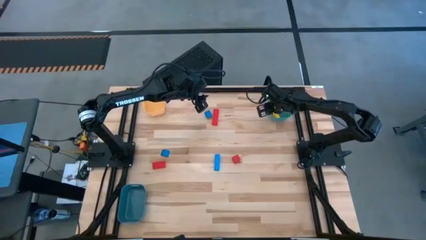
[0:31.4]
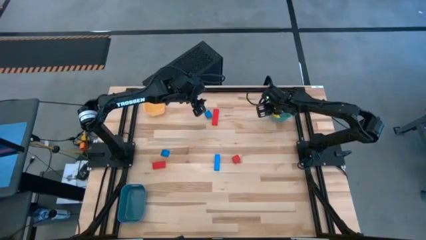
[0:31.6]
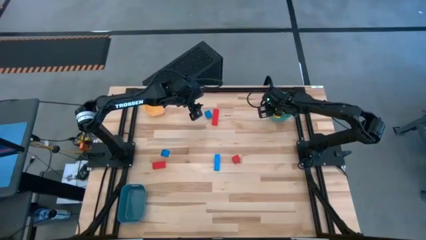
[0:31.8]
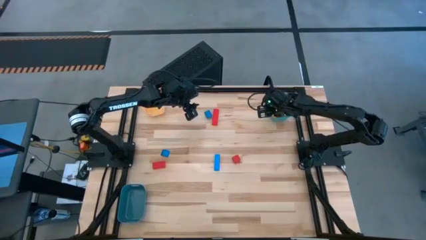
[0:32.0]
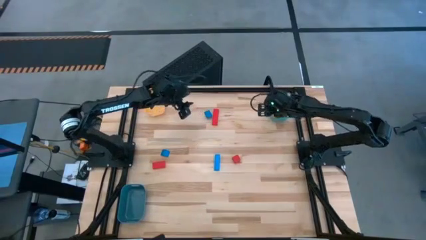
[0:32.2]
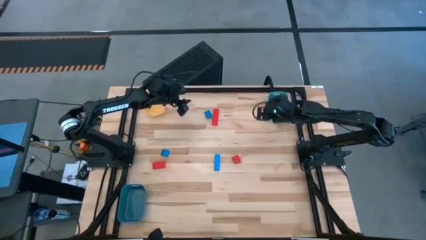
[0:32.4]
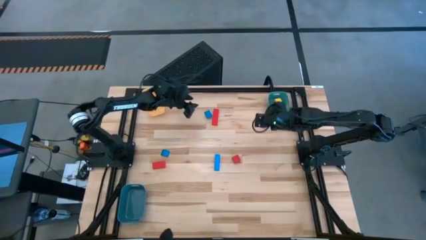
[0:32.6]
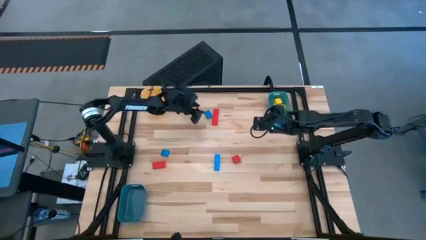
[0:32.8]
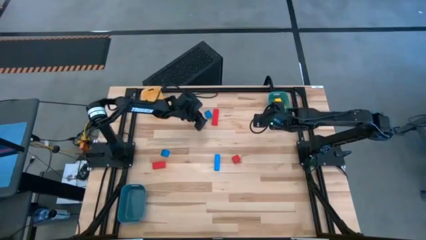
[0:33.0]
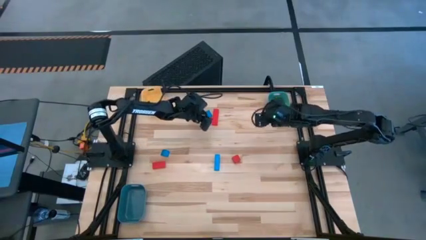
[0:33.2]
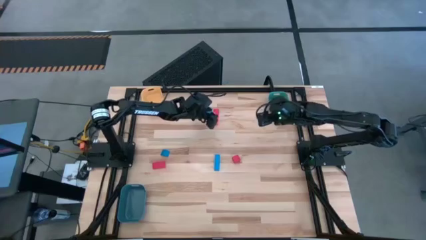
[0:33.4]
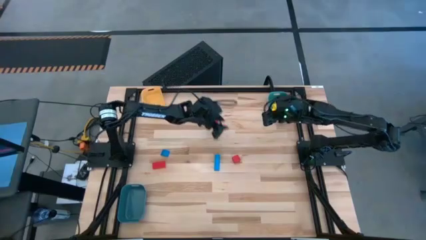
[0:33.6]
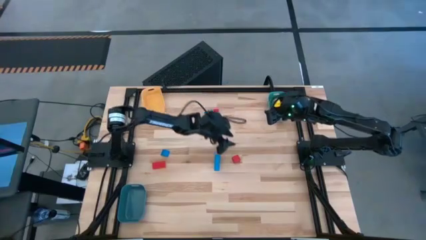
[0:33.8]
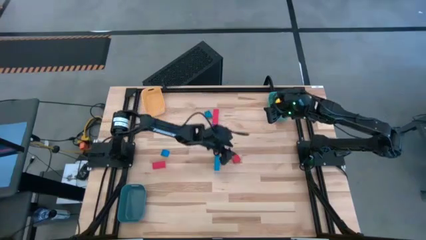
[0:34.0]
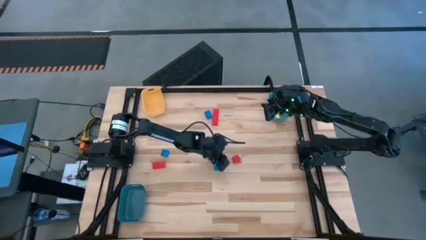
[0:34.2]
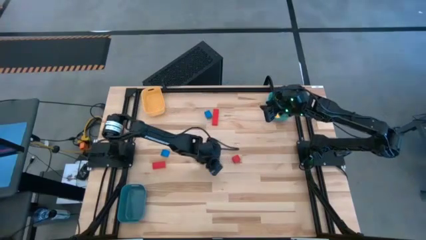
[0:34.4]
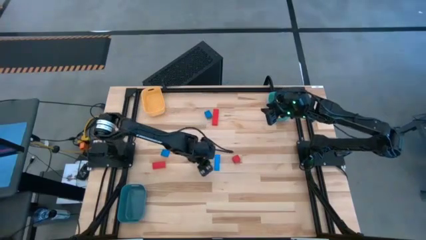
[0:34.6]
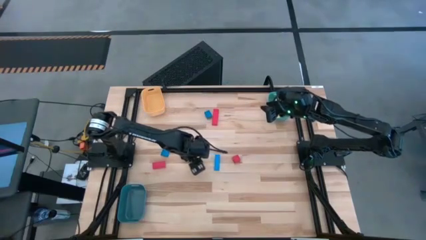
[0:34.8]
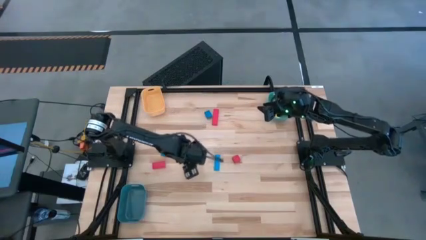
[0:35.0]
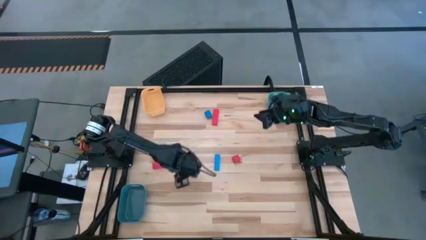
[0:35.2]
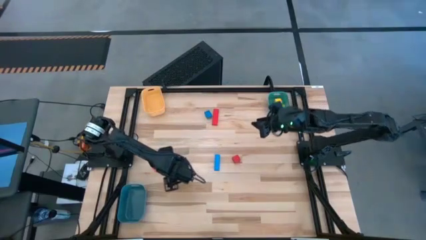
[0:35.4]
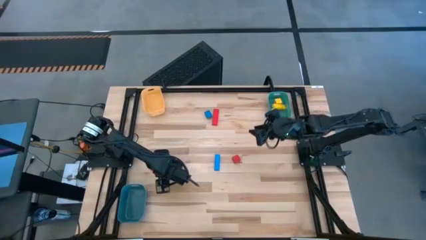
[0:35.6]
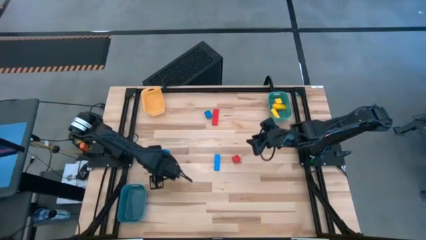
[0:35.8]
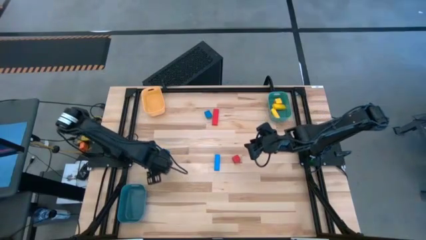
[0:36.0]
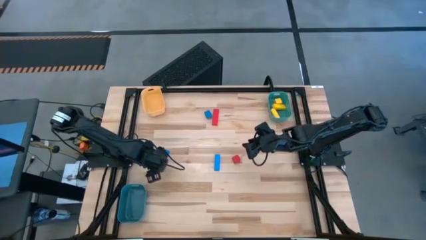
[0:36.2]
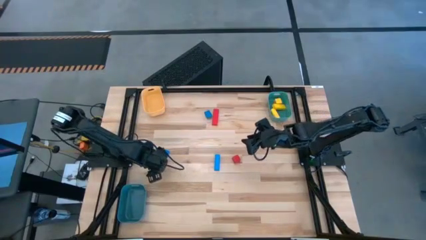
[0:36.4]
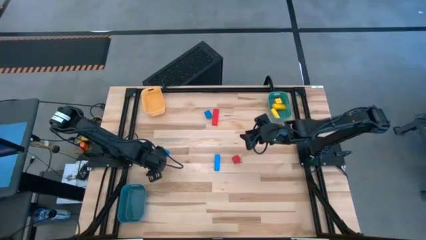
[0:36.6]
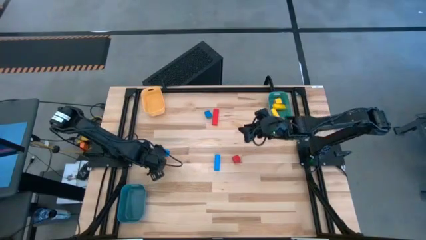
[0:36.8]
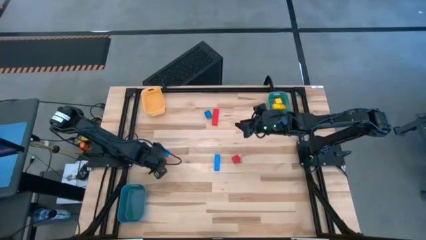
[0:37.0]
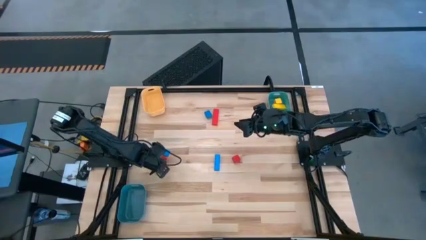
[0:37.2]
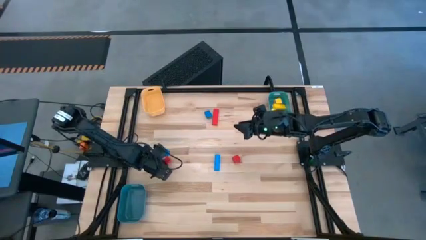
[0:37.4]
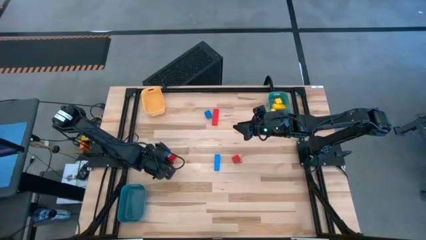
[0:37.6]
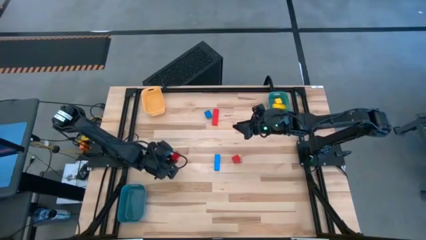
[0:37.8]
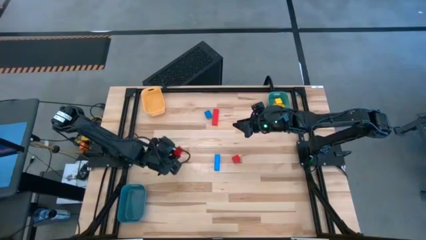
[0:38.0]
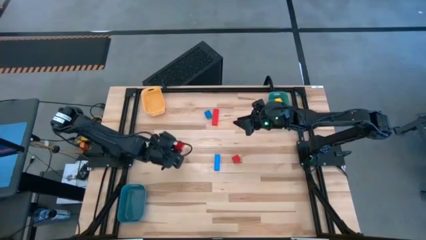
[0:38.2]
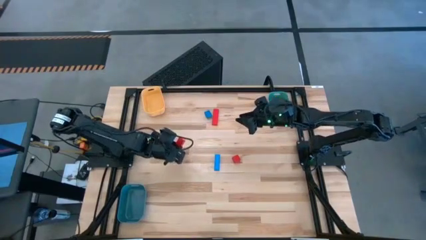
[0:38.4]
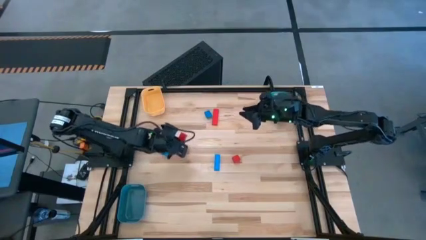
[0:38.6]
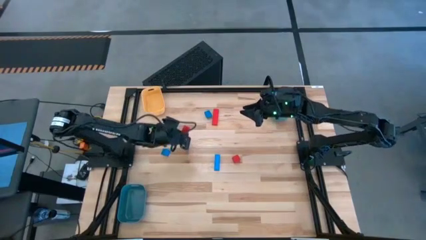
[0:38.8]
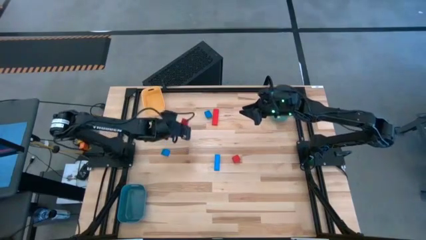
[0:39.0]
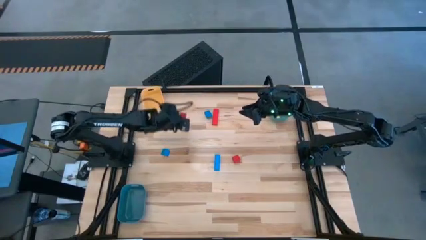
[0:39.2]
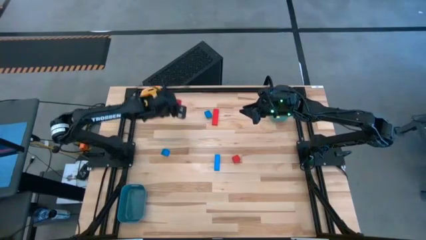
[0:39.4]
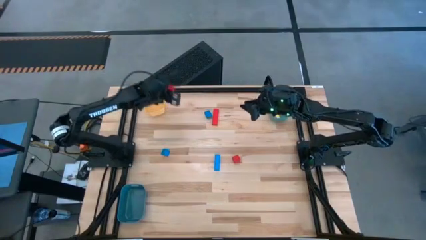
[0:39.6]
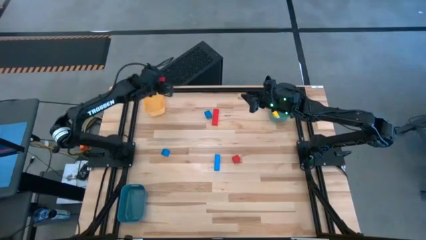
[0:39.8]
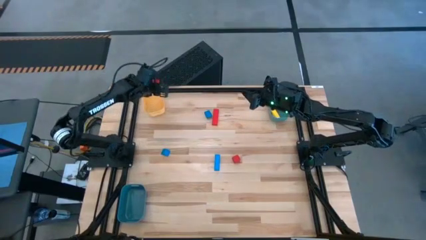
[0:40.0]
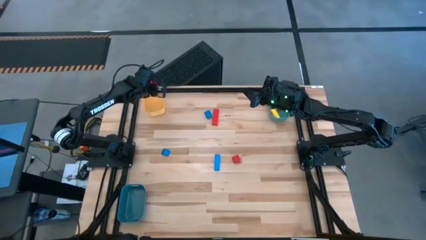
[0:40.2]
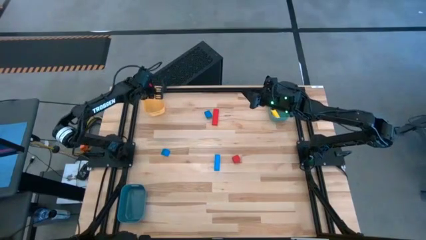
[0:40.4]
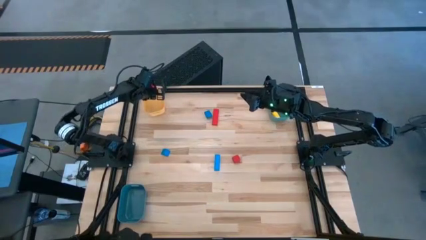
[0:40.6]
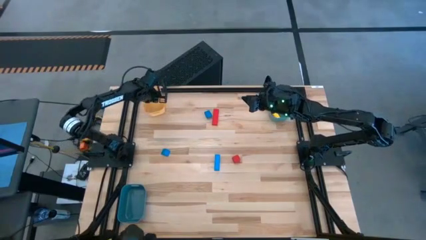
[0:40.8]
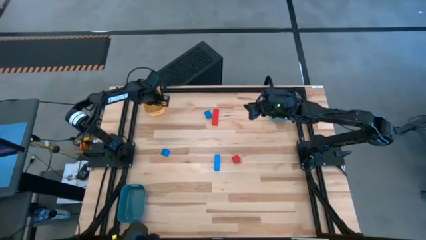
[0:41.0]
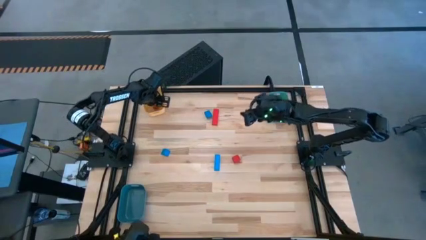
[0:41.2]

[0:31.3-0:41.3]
Task: Sort & place blocks by color
Put the left red block into the orange bin
